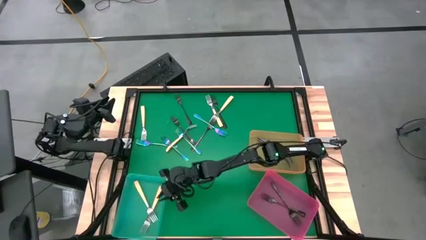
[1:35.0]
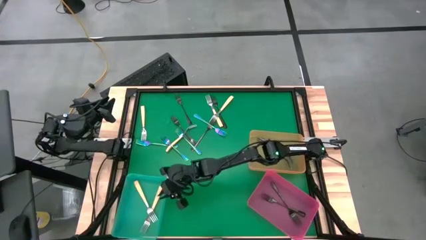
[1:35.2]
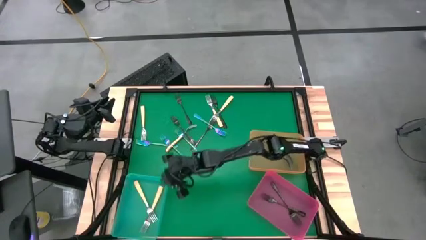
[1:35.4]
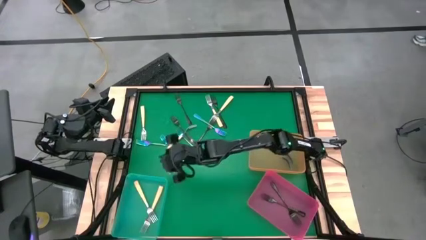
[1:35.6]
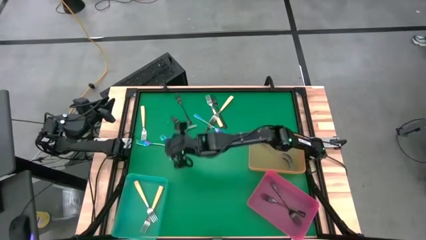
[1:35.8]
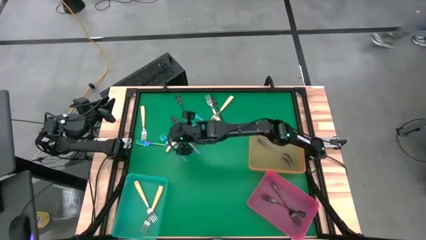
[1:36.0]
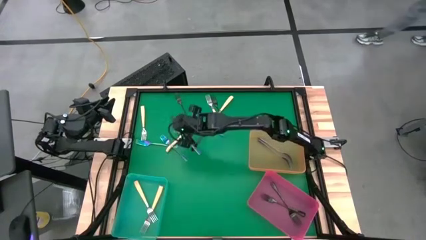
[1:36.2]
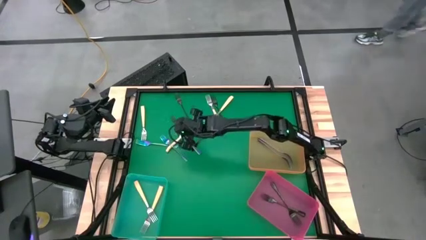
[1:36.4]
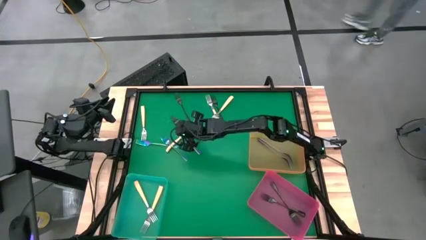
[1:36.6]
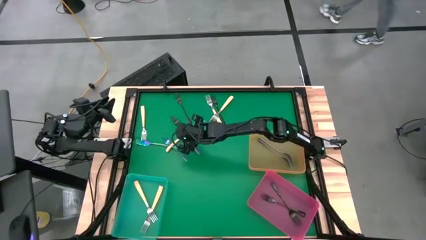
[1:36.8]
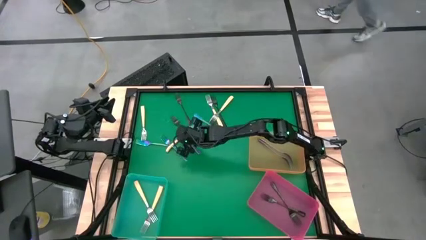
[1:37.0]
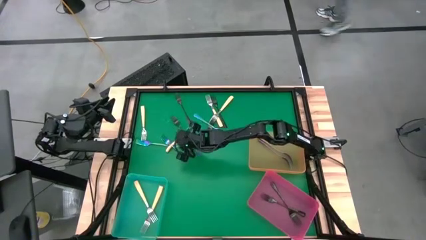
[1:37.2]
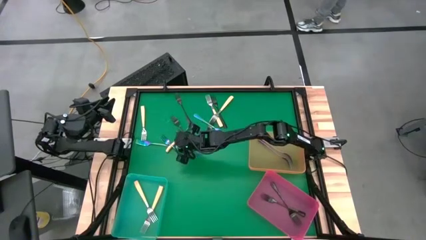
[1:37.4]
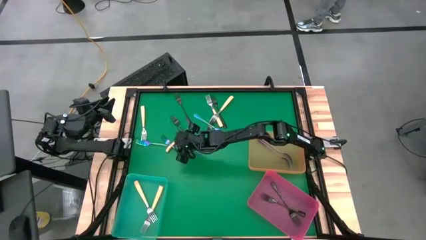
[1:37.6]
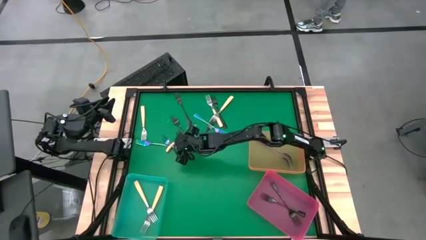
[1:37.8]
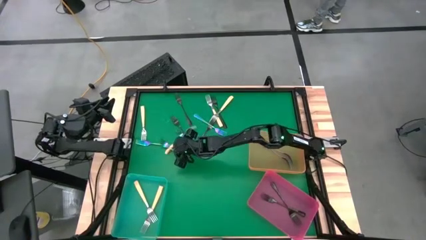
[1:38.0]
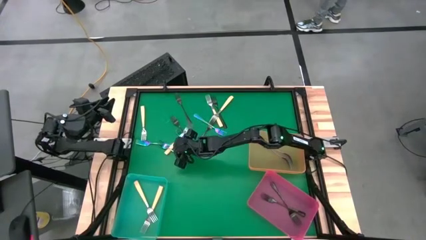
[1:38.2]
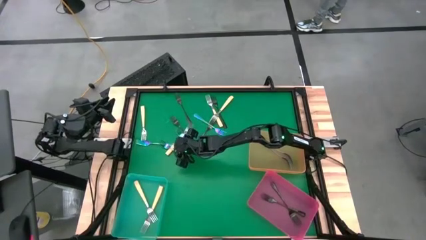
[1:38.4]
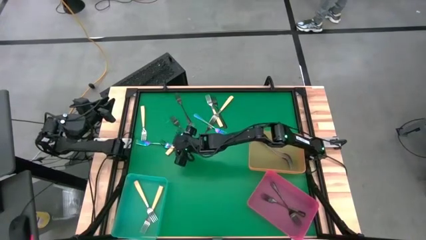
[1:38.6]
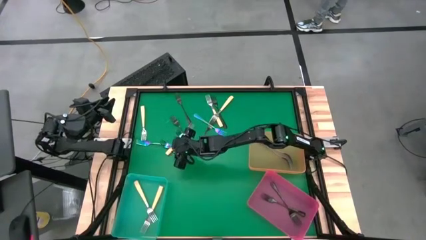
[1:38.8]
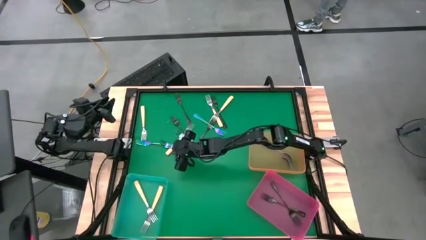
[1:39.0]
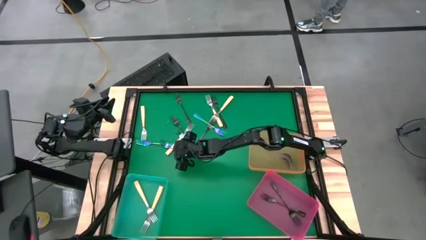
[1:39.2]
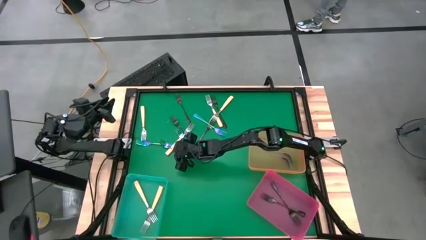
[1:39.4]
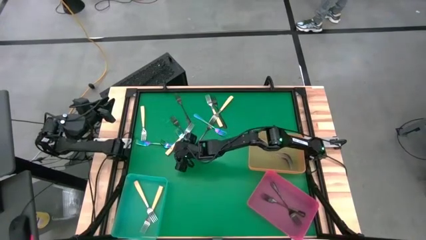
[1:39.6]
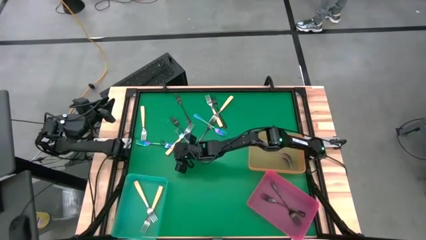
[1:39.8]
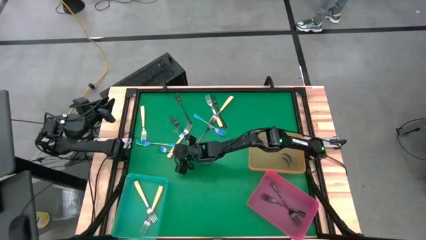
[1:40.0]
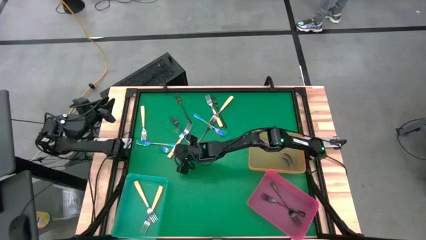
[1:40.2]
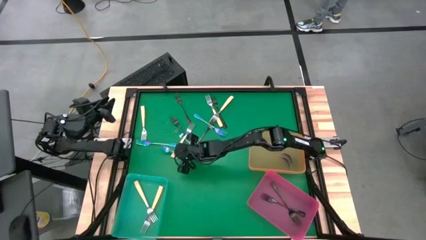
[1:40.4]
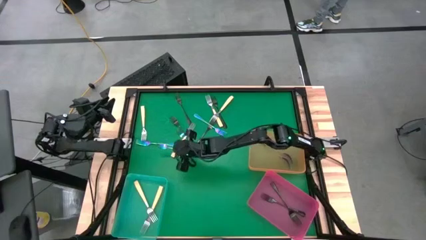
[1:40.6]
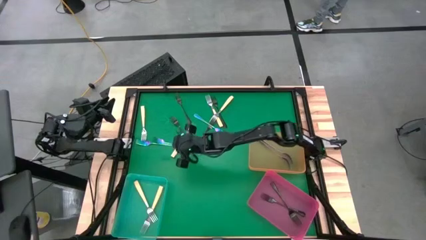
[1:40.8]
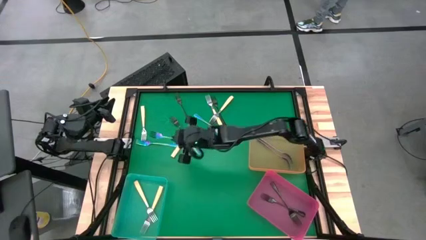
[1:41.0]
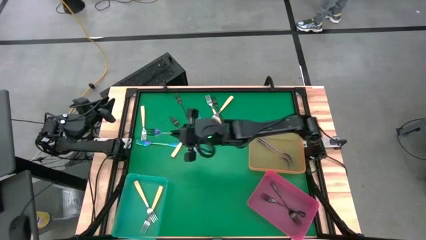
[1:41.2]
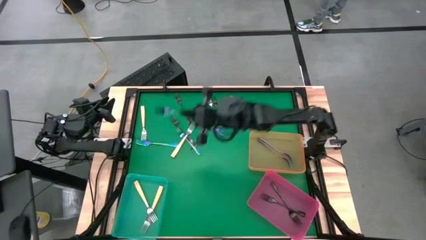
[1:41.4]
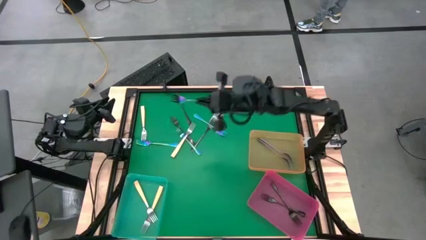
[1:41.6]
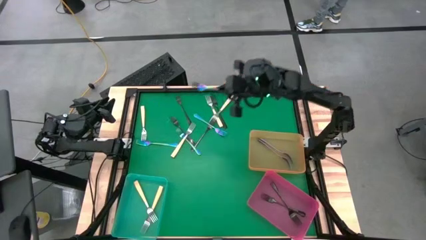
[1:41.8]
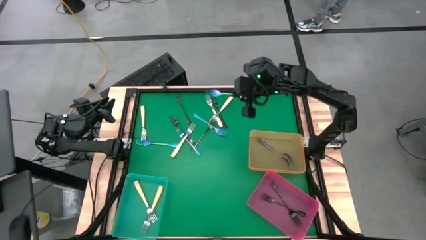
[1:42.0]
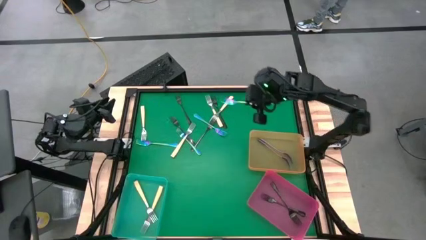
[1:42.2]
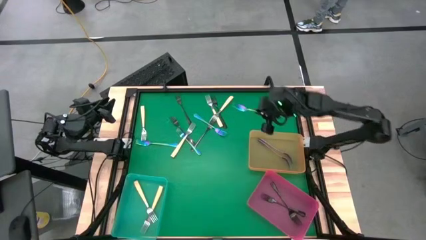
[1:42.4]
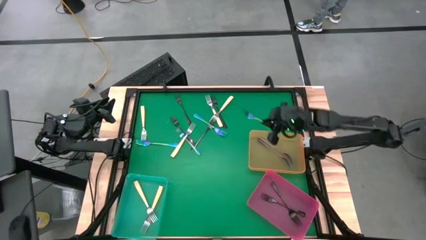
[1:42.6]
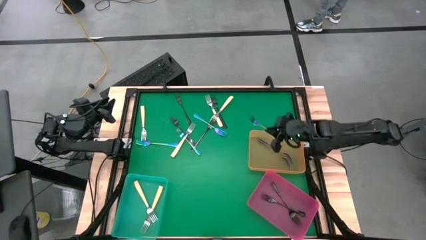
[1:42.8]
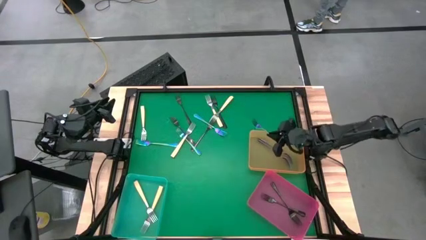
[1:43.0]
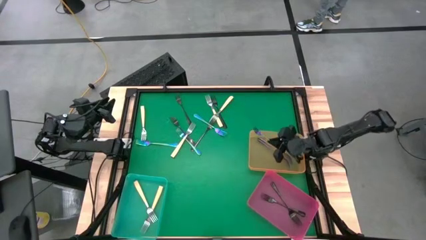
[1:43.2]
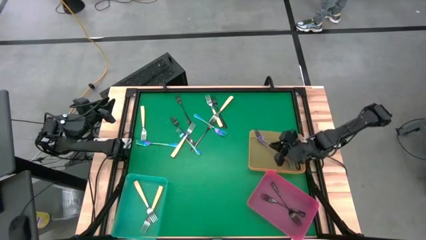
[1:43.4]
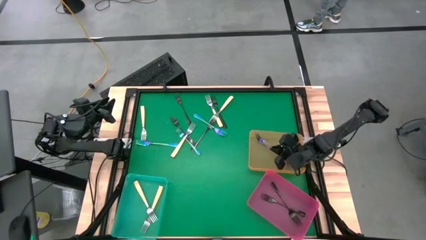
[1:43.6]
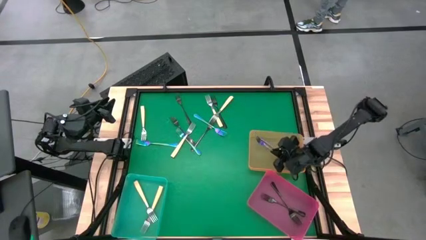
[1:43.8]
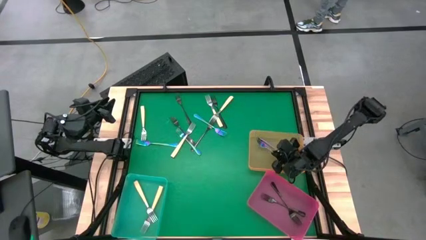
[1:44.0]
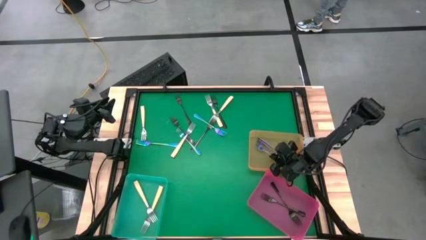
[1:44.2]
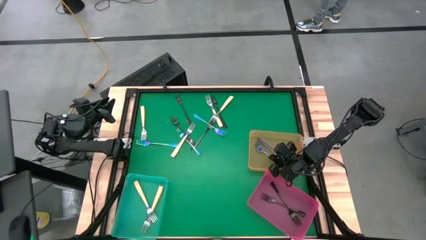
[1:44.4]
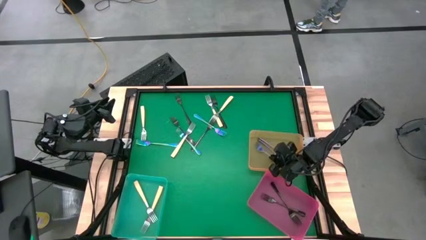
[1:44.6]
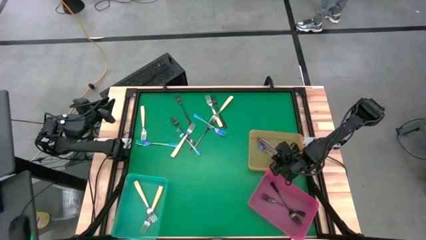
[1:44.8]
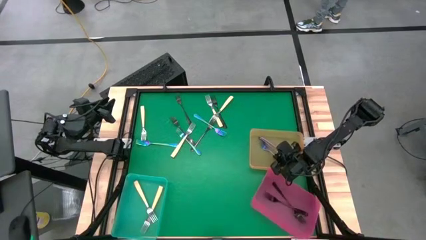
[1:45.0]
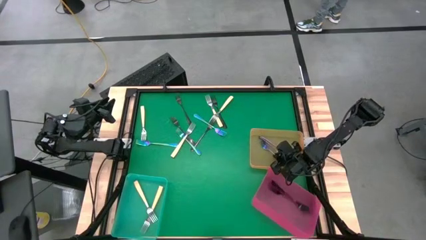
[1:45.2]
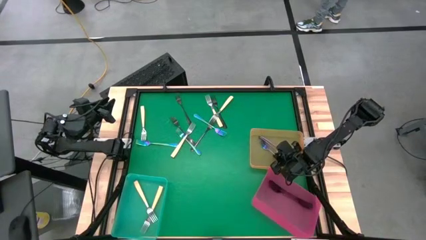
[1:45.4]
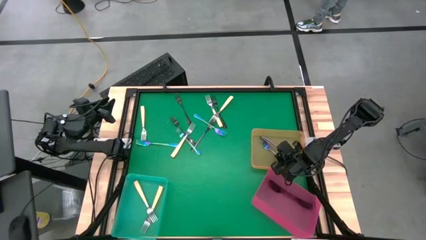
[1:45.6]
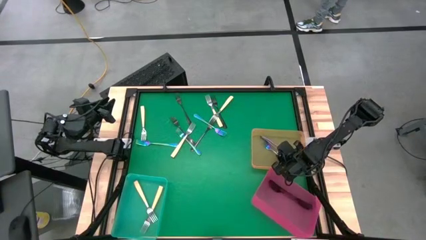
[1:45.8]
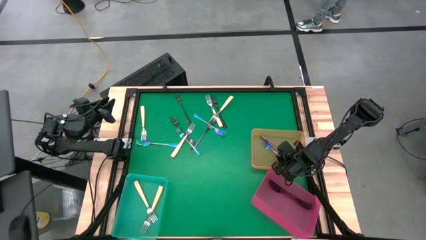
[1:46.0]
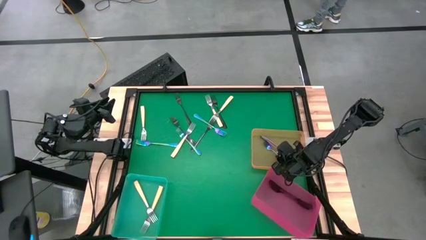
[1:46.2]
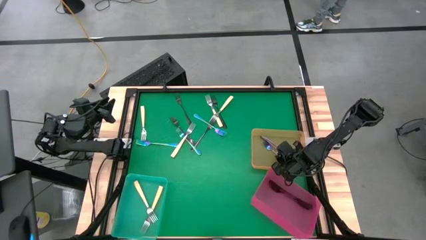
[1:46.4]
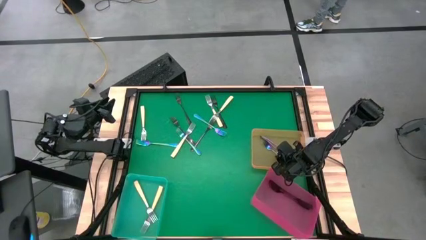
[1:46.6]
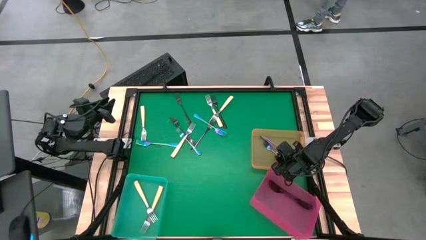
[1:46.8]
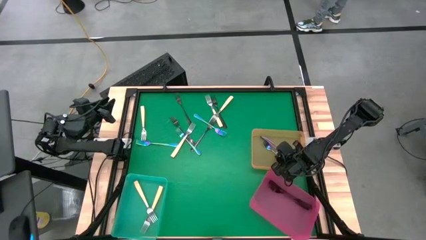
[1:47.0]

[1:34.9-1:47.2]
Task: Sort silverware by color (type)
Put the blue fork into the orange bin

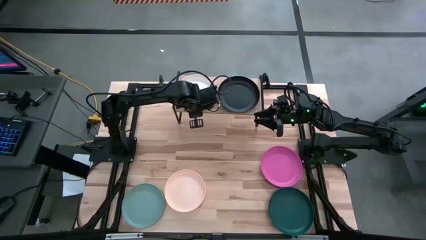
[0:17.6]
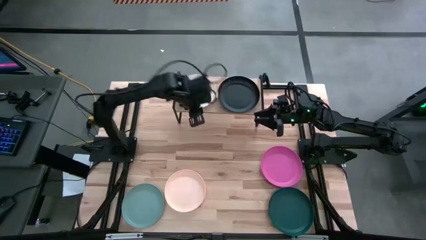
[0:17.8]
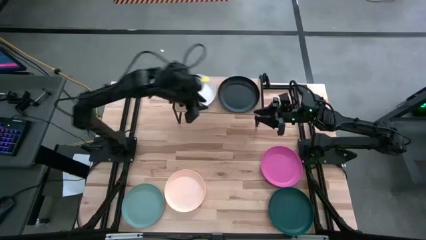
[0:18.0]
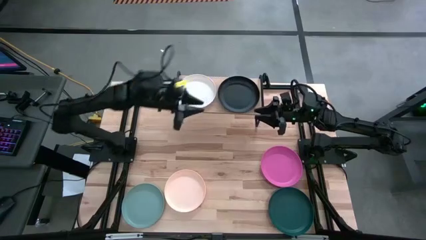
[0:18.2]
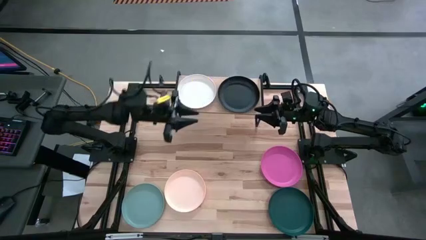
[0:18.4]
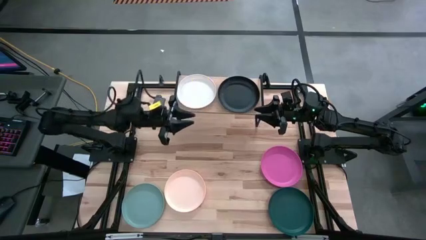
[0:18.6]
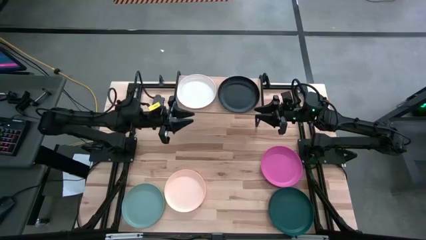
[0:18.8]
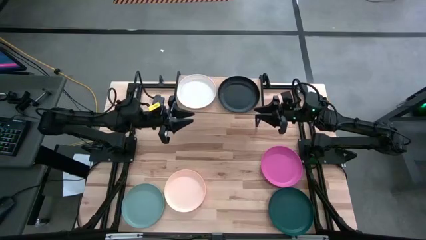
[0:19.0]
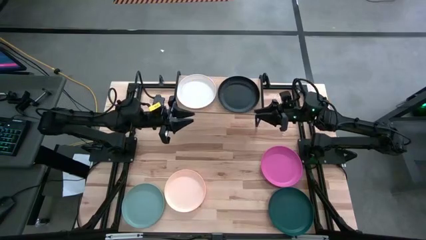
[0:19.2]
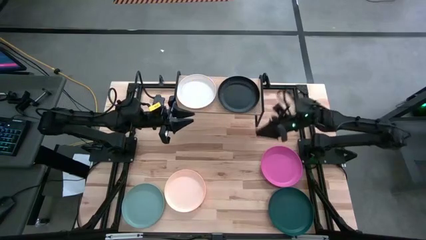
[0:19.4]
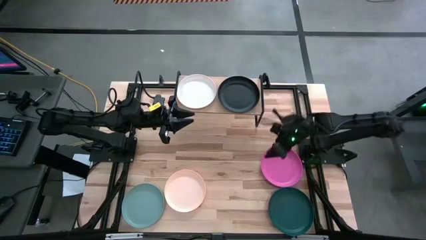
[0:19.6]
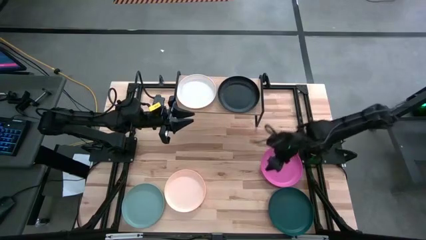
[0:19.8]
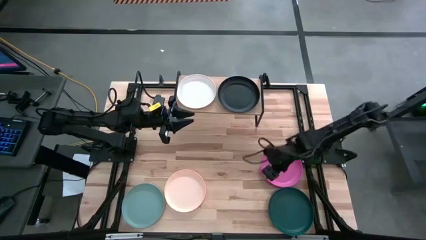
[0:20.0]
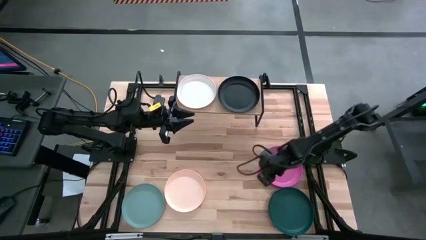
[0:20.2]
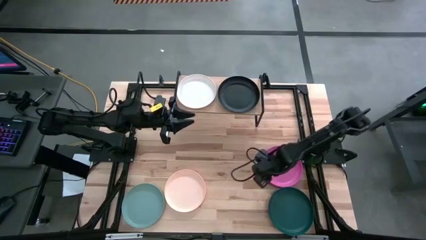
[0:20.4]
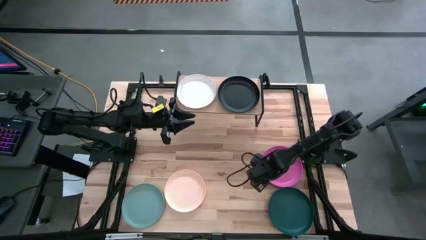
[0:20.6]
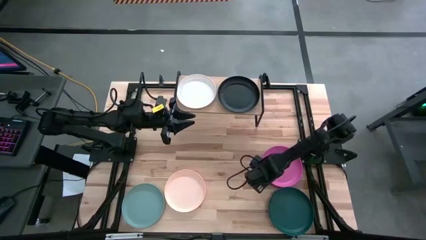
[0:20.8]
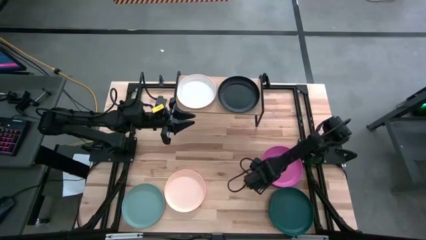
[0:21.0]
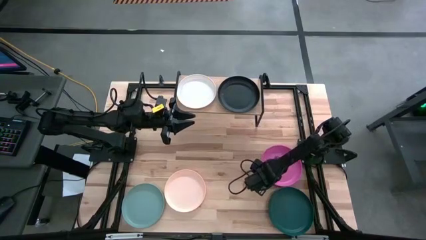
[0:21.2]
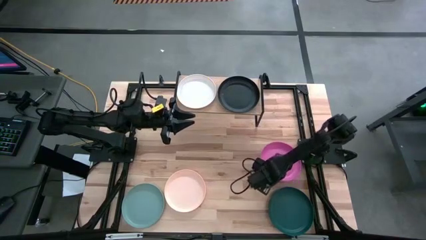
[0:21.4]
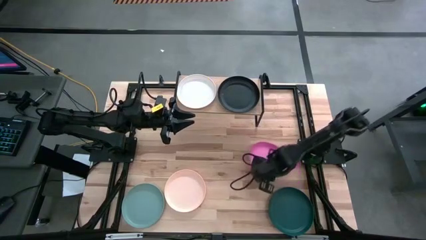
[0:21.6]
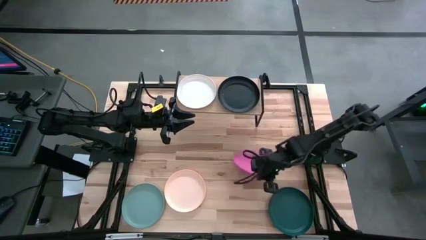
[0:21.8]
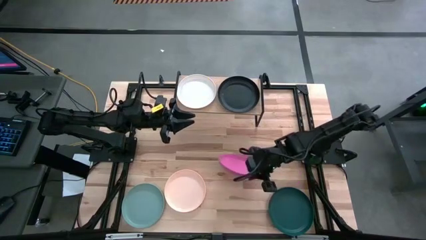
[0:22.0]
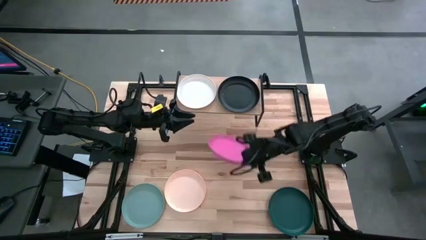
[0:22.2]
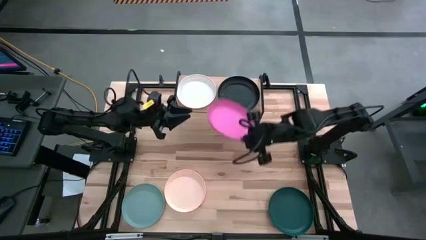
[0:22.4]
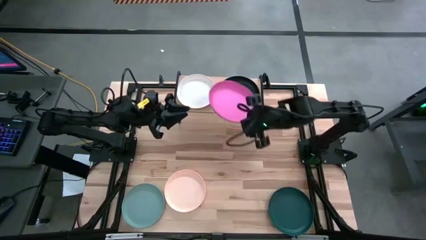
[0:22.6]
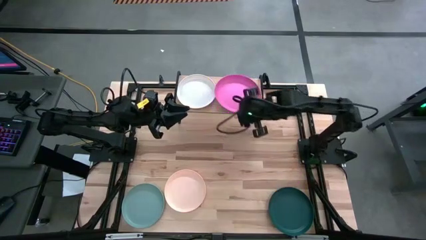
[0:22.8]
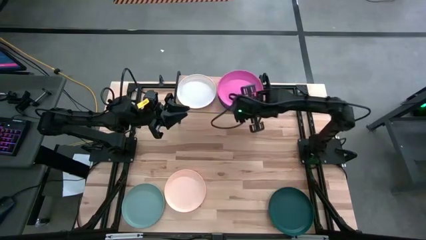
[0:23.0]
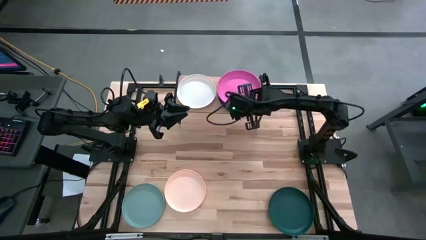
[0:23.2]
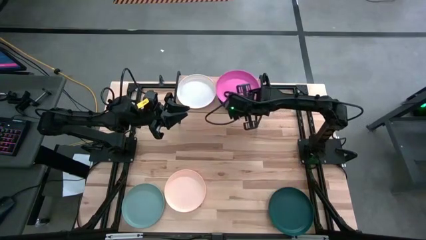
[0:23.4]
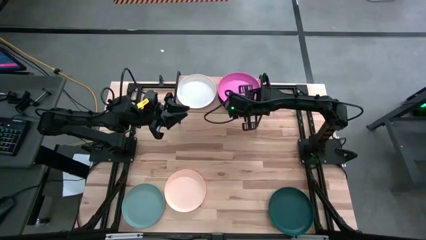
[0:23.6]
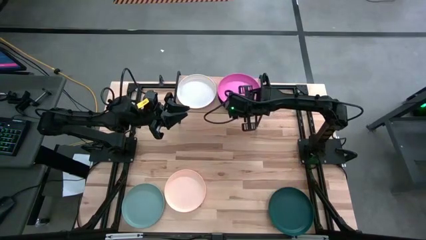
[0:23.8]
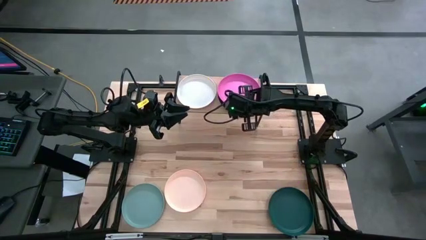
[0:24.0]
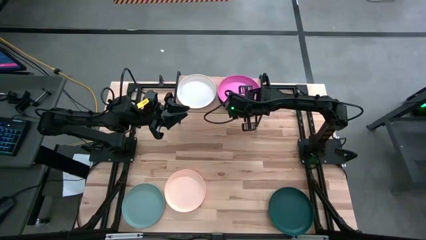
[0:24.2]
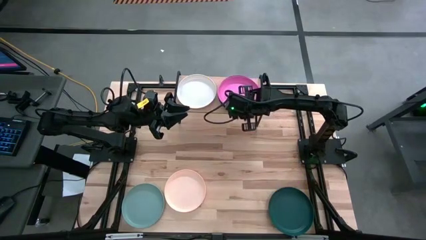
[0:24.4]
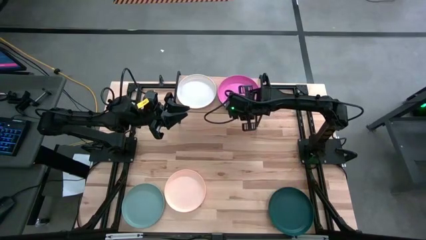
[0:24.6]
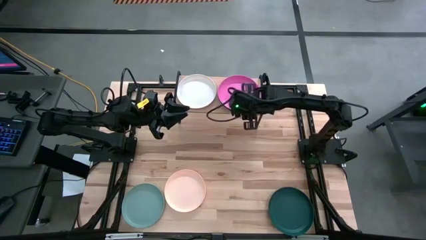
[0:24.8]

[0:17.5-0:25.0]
Task: Place and stack plates onto a shelf
Stack the pink plate on top of the black plate on the shelf
